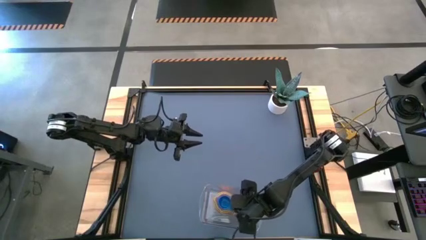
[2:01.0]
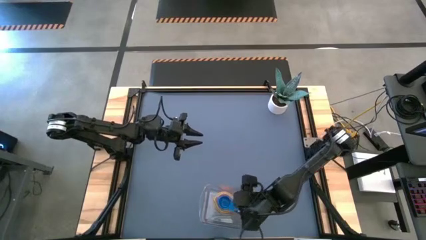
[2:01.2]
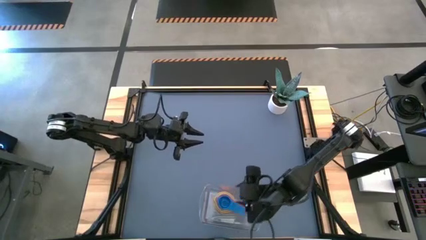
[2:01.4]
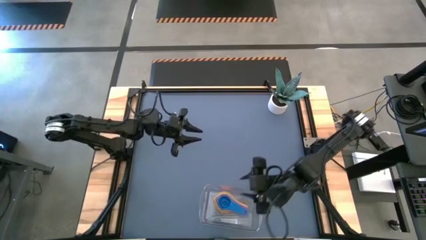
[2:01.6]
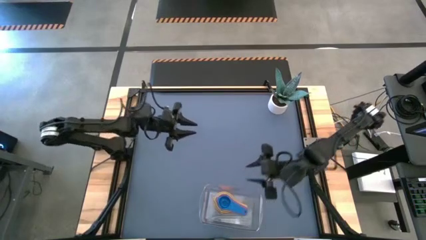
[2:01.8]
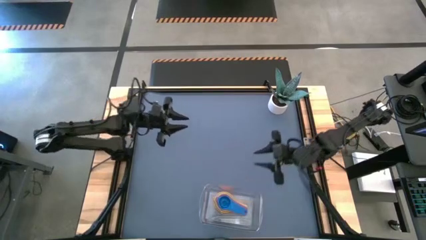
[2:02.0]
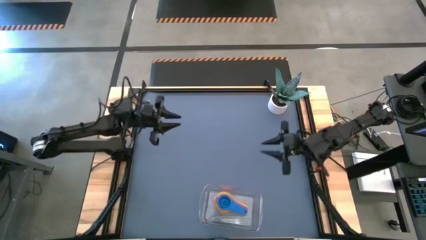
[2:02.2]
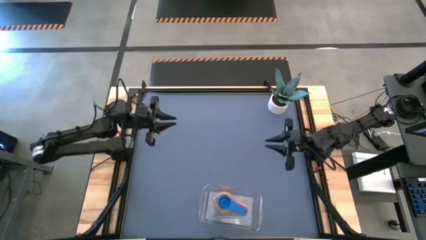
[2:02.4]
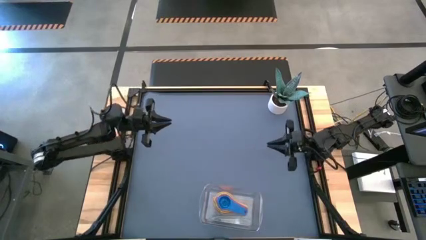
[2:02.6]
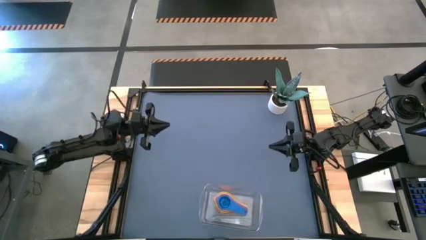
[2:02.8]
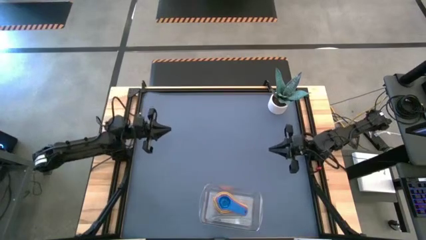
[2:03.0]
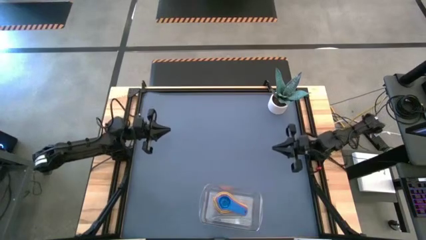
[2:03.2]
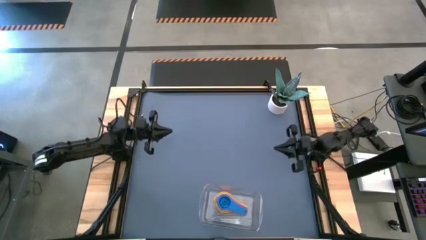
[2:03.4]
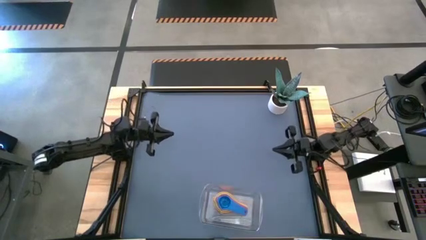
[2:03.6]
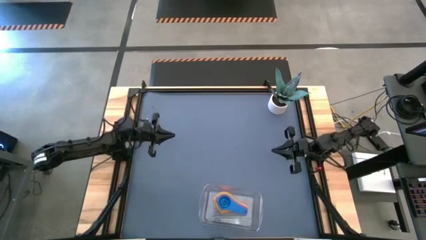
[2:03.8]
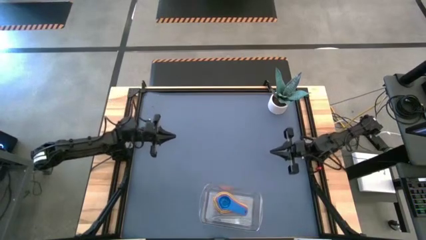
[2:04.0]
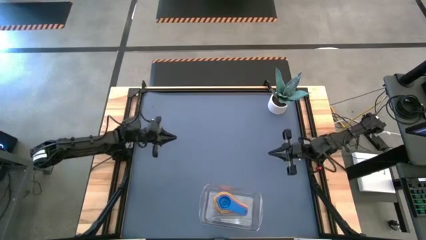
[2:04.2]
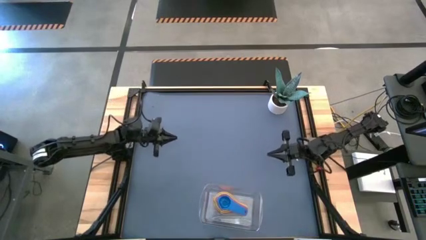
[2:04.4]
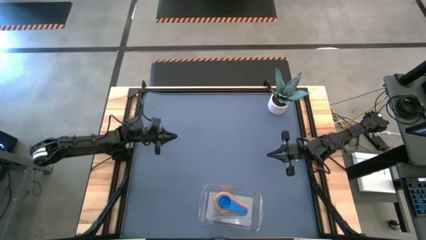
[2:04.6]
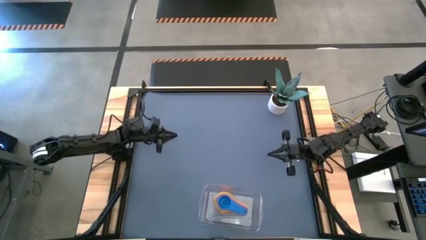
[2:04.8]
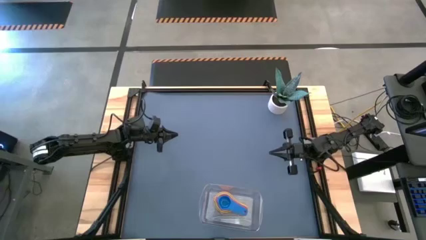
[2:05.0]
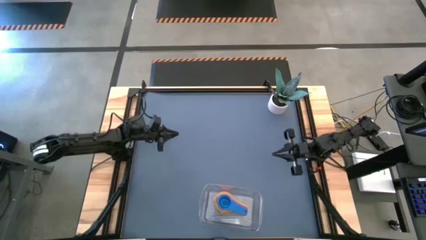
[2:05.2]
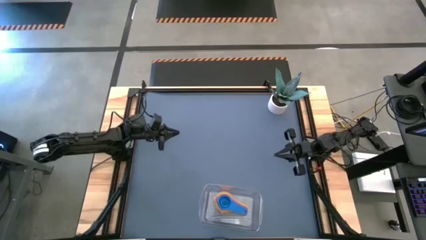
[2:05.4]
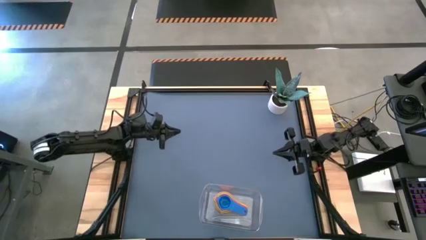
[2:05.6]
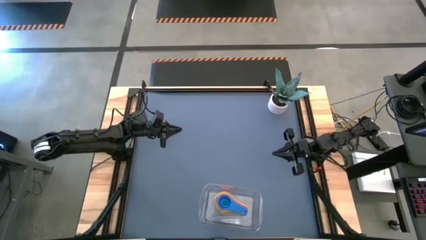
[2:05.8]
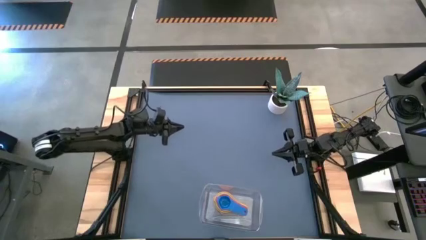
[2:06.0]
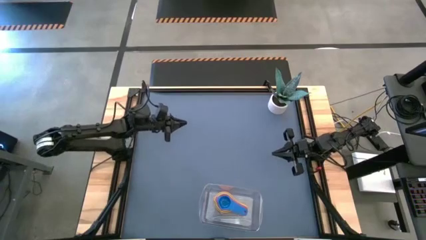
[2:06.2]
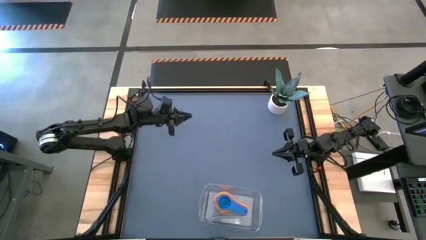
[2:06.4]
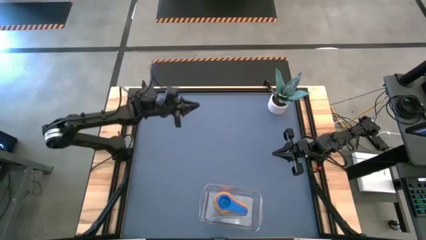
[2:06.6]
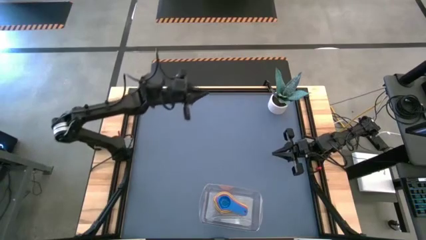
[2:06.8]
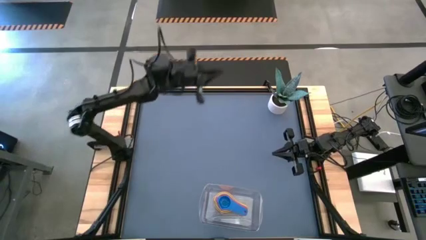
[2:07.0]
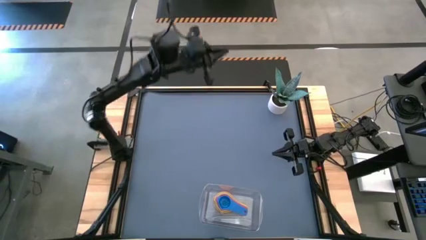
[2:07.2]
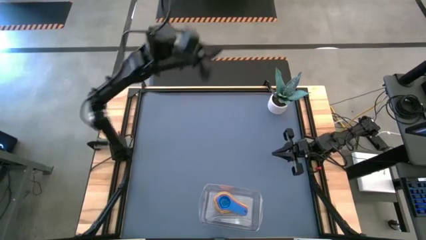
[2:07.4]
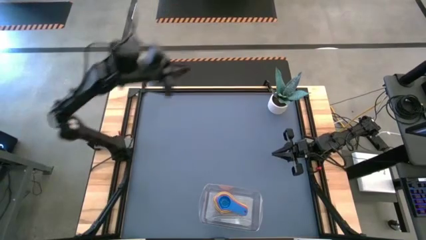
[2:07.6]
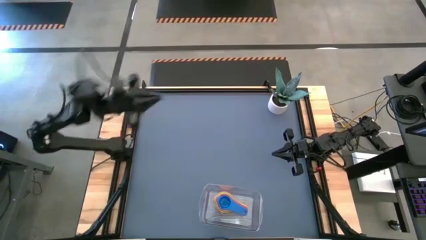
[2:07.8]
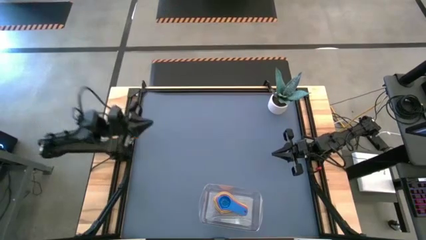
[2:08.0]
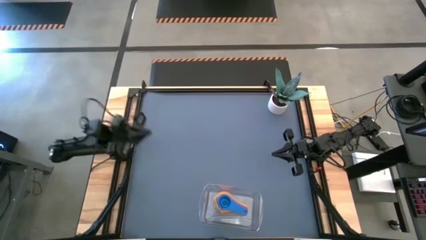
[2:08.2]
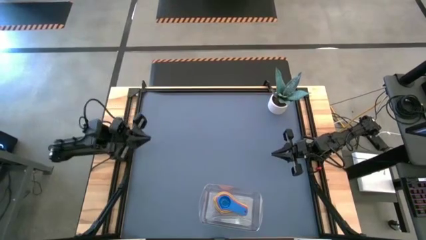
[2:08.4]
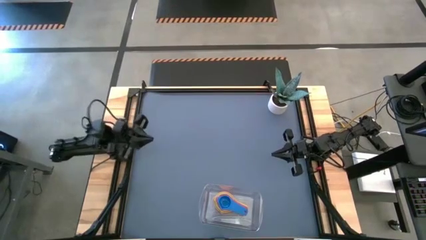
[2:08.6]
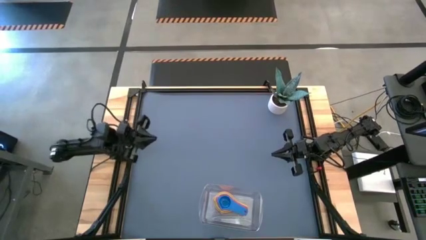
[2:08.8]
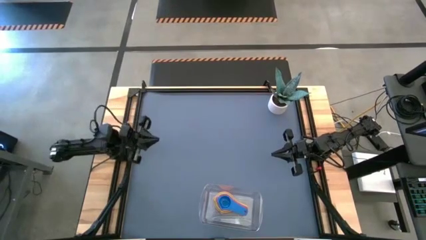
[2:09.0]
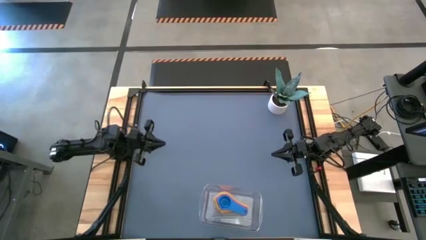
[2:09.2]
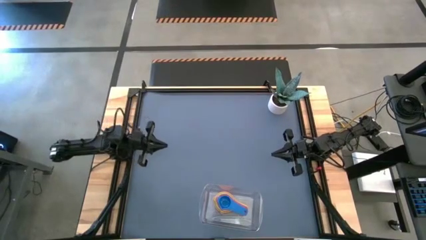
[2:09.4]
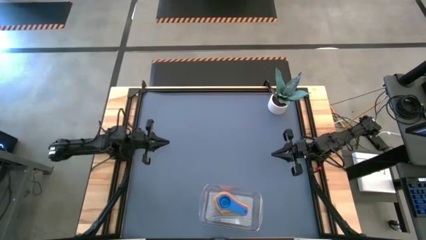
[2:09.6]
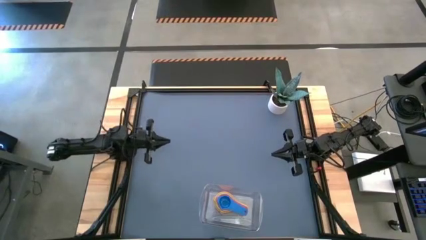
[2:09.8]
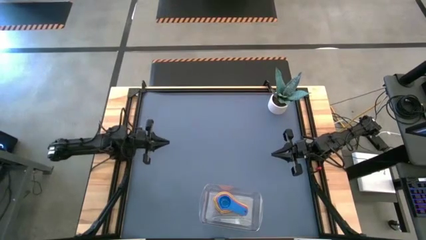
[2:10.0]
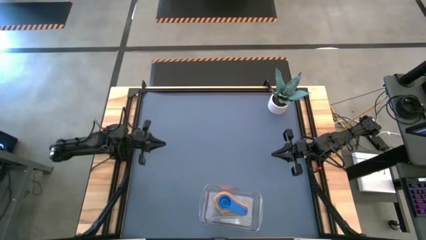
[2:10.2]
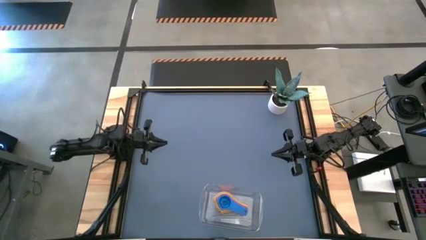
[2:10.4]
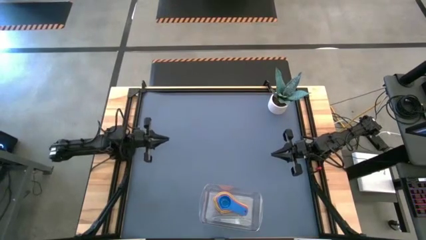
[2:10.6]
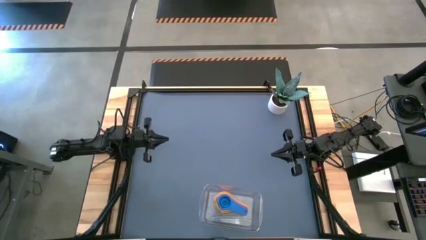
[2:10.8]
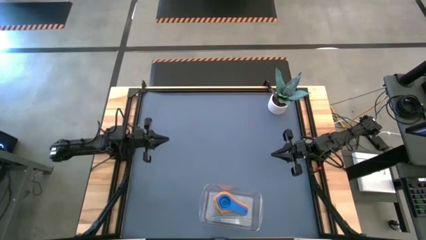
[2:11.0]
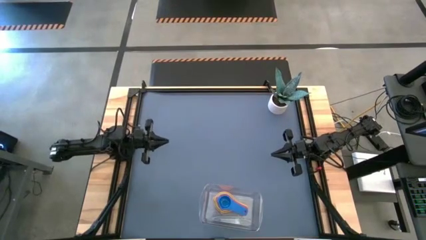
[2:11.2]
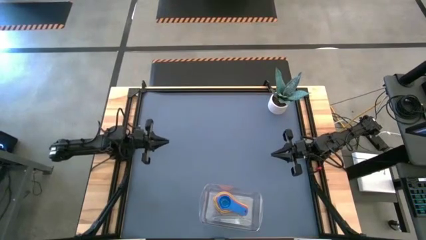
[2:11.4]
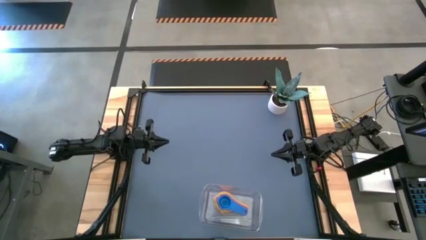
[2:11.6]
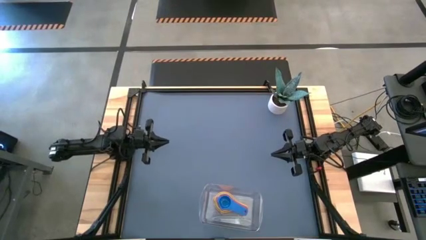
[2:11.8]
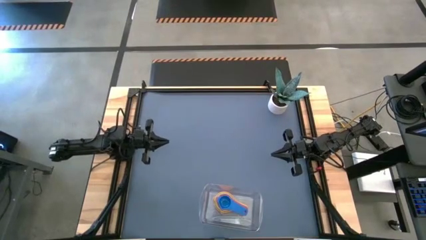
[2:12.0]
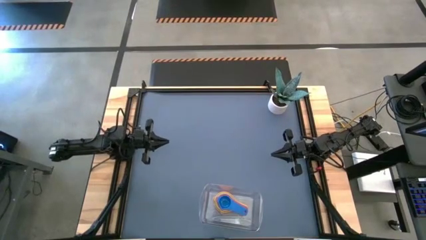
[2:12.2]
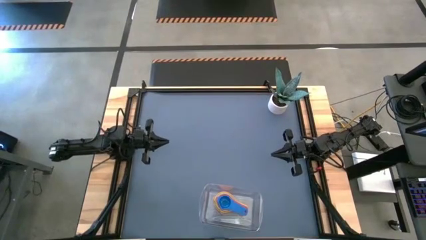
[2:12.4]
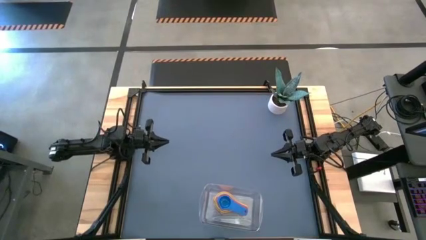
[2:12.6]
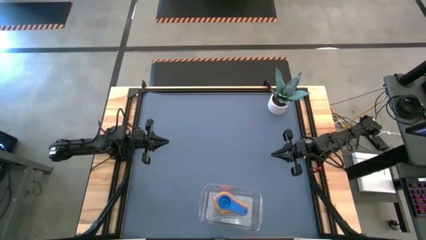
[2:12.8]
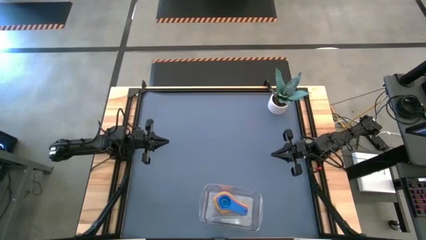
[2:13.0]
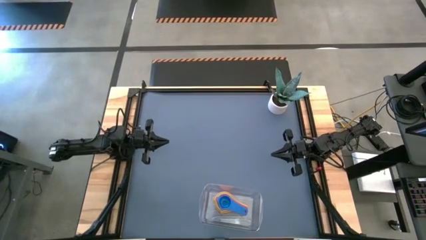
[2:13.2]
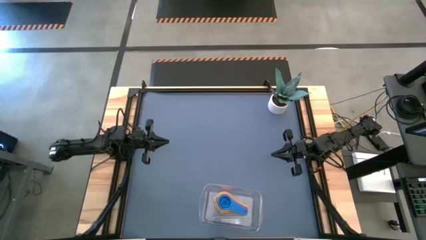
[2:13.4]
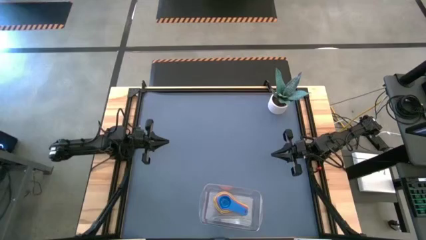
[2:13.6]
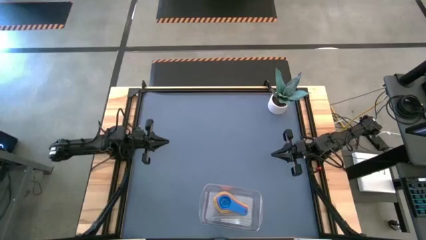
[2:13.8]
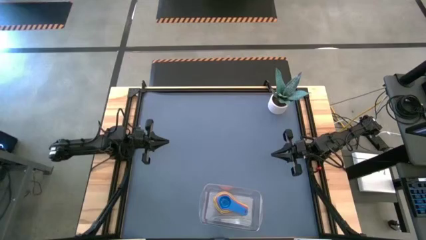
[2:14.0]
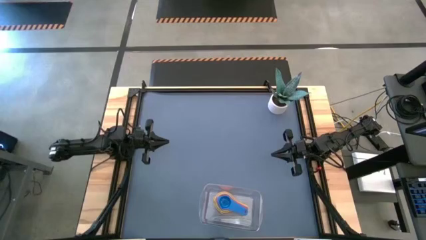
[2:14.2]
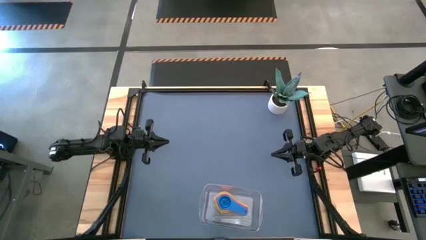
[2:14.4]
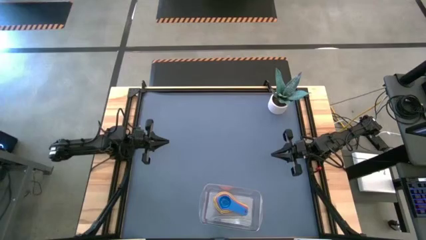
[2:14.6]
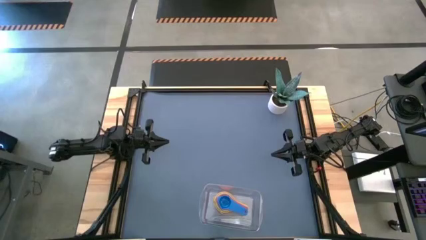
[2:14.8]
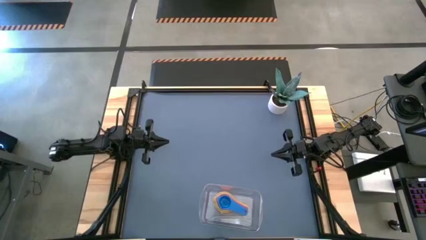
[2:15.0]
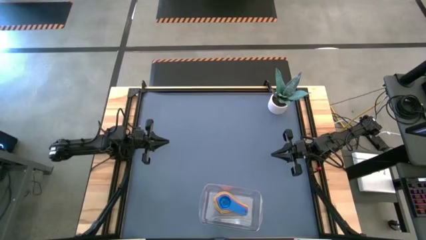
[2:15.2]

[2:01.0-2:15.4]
Task: Nest measuring cups in basket
Return to Home Position
